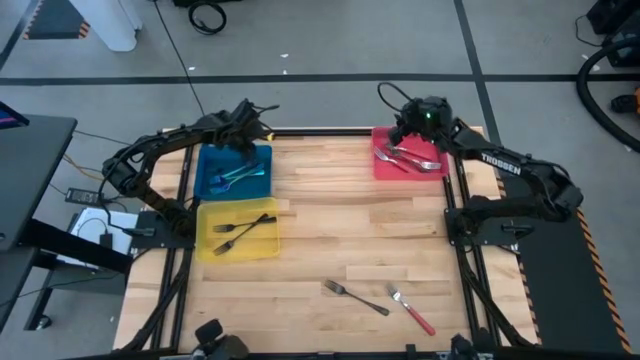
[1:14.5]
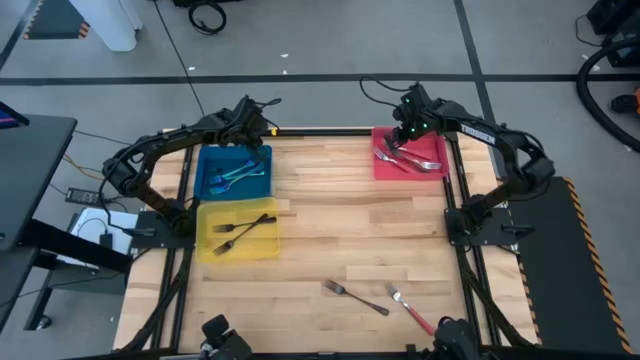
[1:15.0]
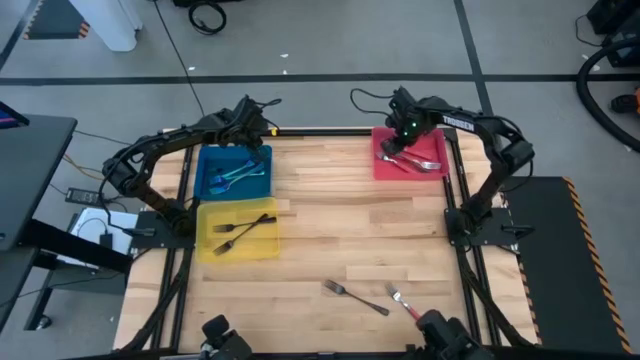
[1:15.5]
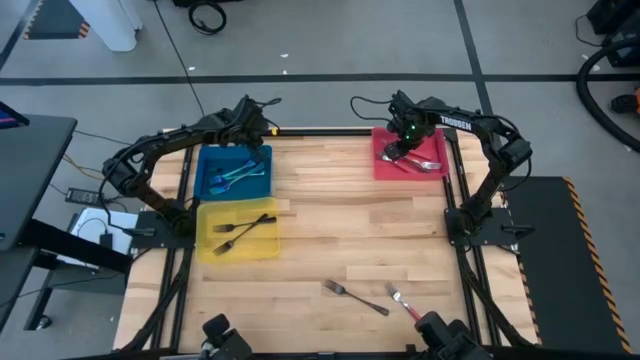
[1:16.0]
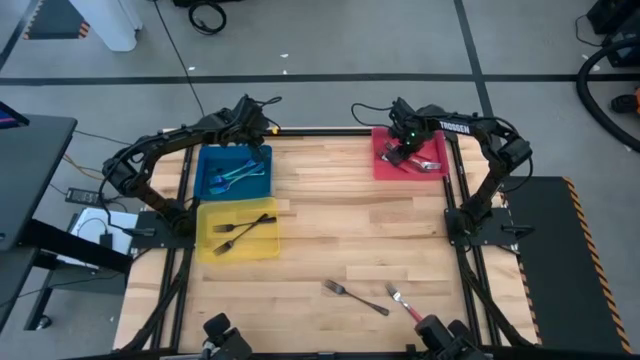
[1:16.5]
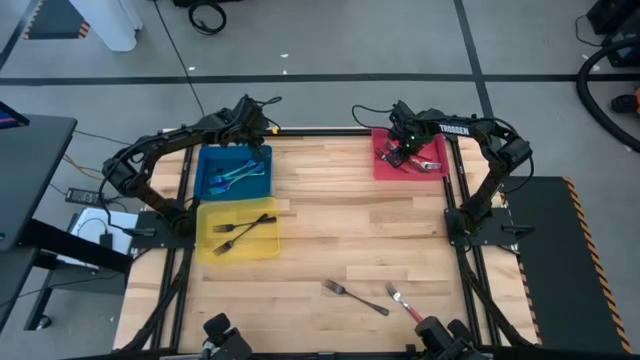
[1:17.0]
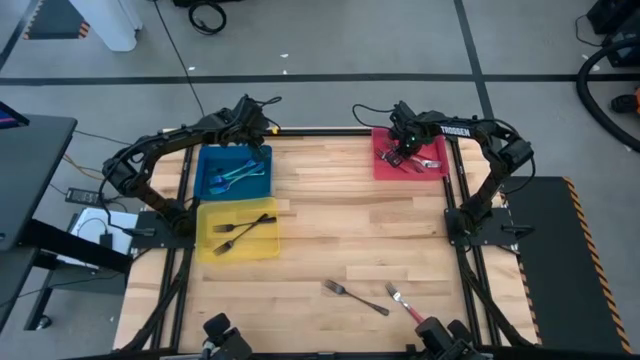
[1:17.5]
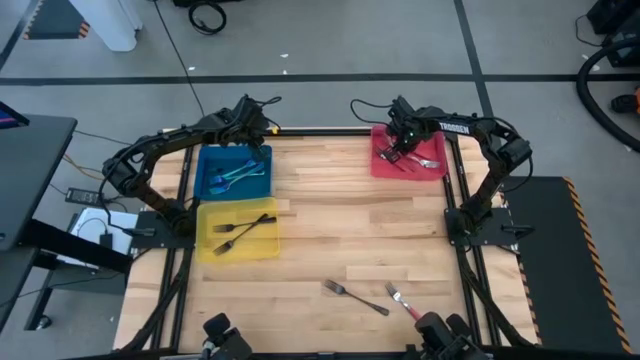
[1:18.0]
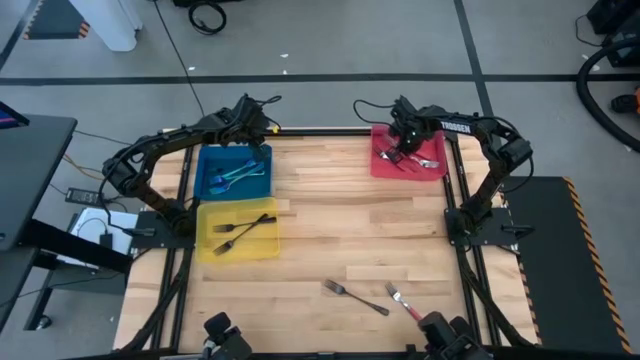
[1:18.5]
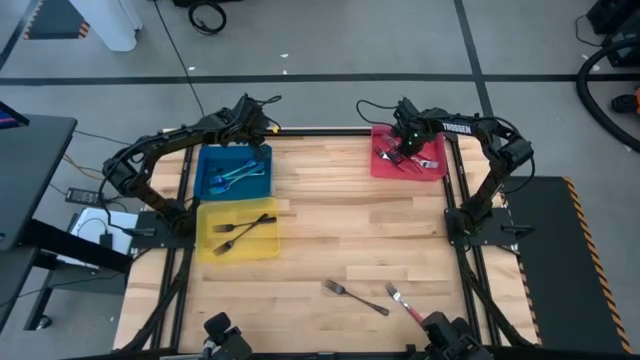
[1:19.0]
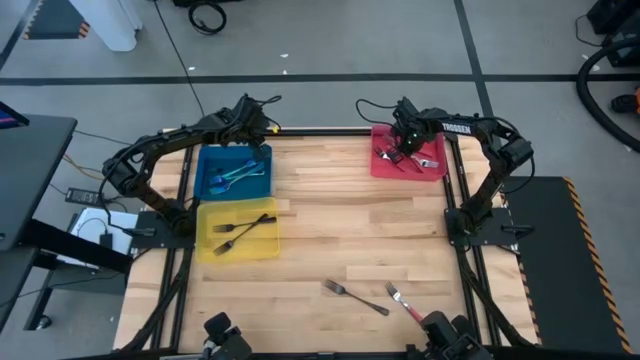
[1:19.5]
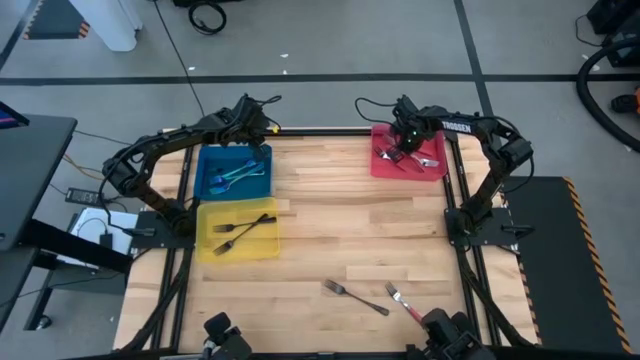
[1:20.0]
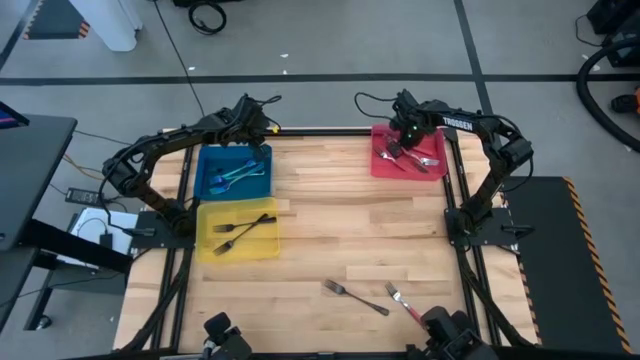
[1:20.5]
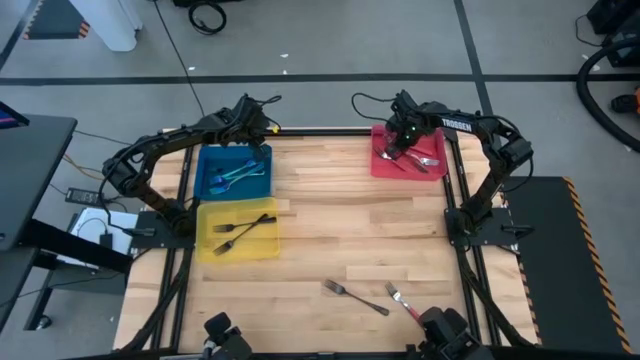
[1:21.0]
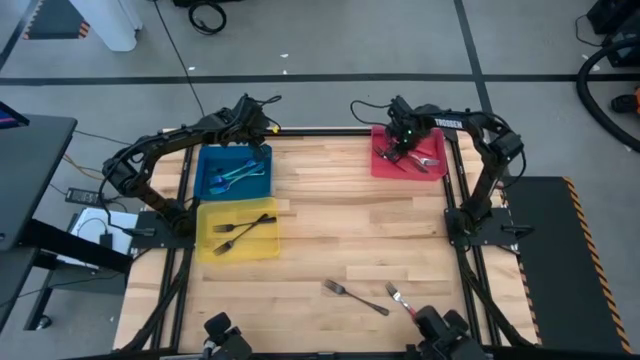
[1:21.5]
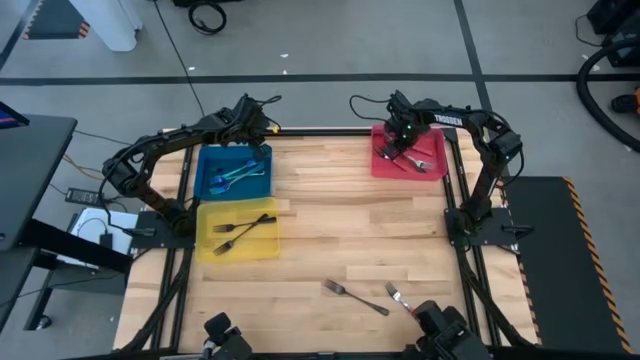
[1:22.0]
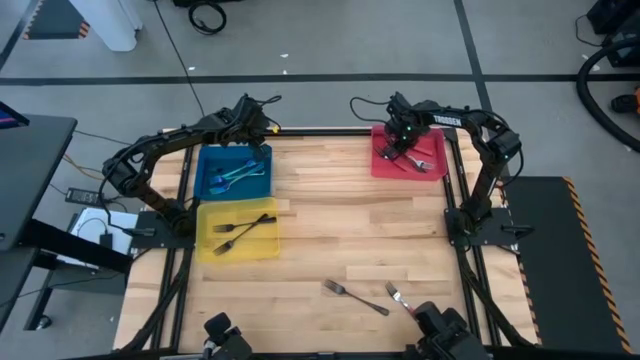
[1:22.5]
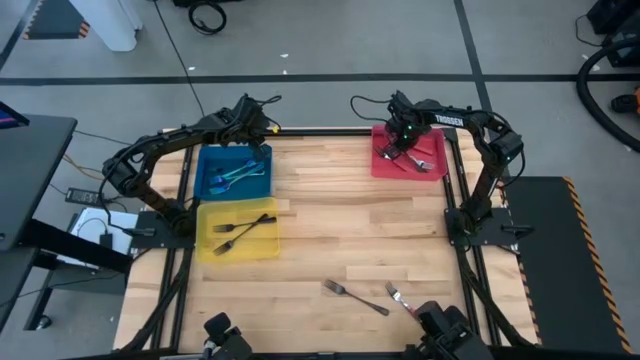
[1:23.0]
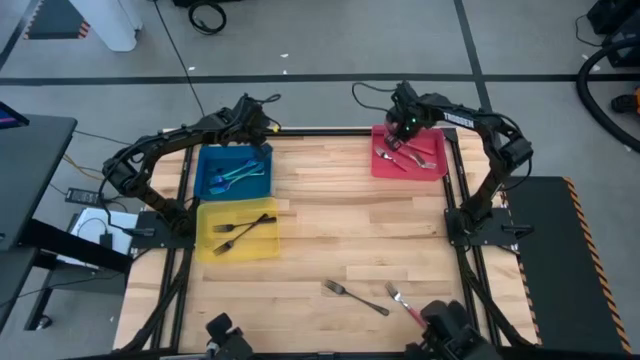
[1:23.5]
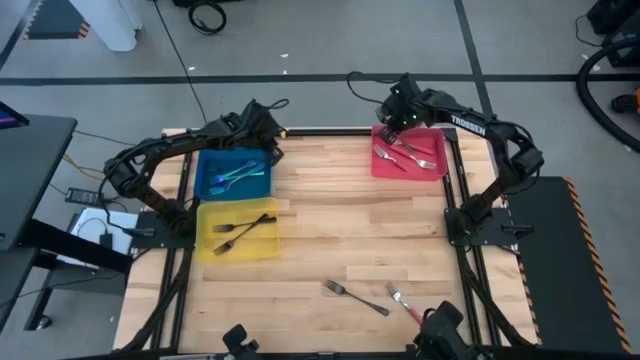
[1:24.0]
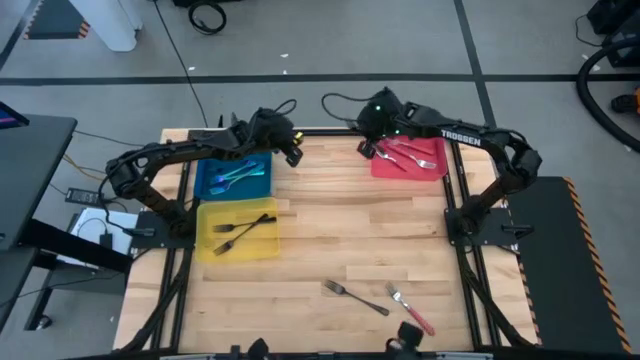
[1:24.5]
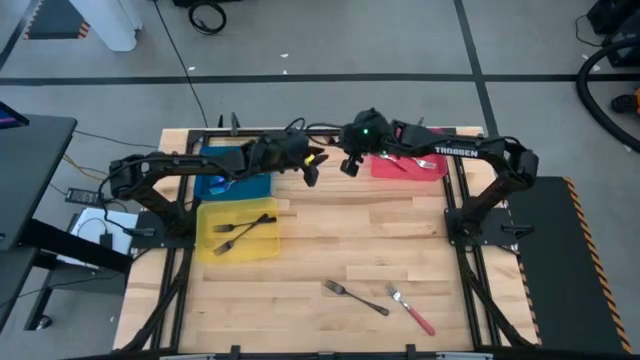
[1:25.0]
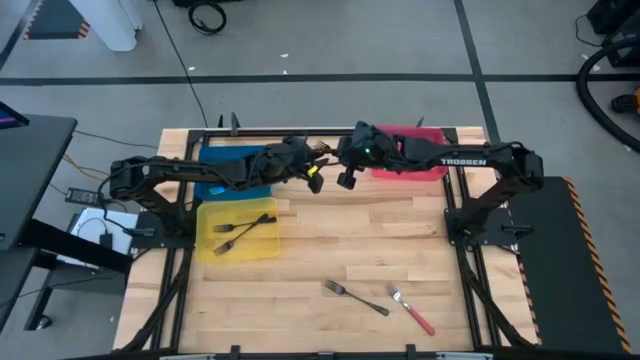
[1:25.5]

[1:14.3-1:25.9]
Task: Sort silverware by color (type)
Put the black fork into the yellow bin

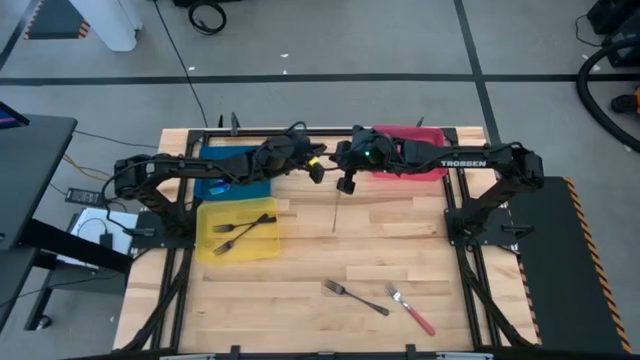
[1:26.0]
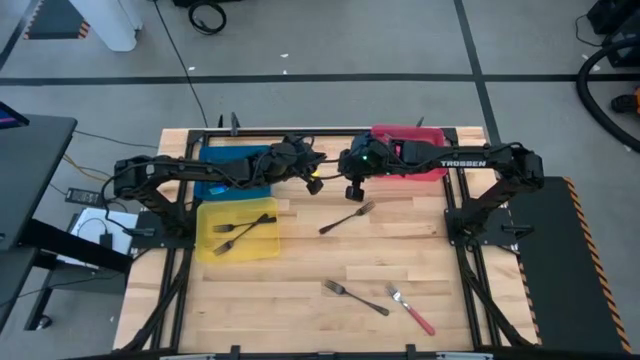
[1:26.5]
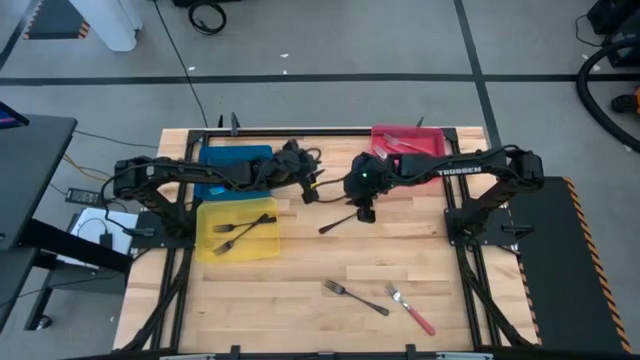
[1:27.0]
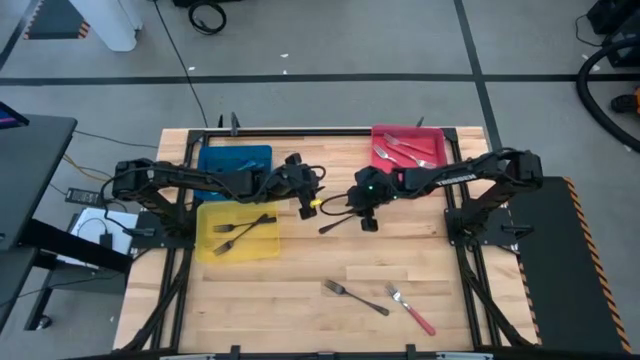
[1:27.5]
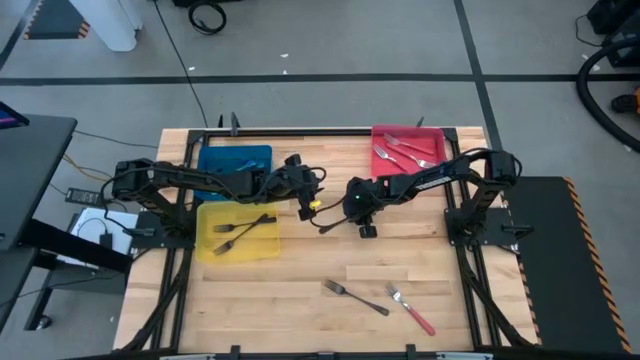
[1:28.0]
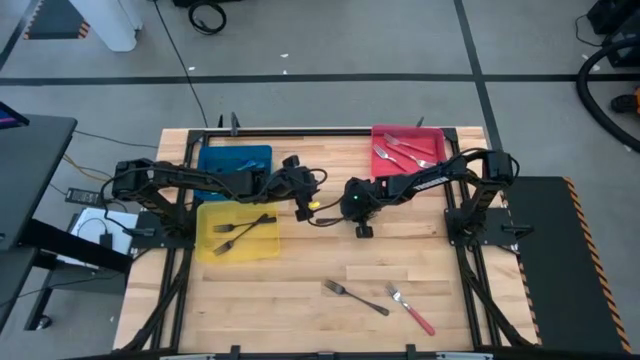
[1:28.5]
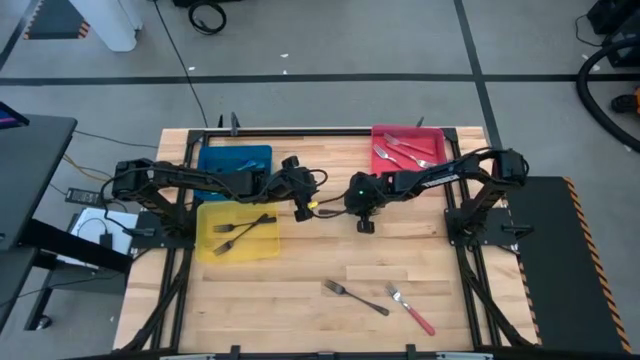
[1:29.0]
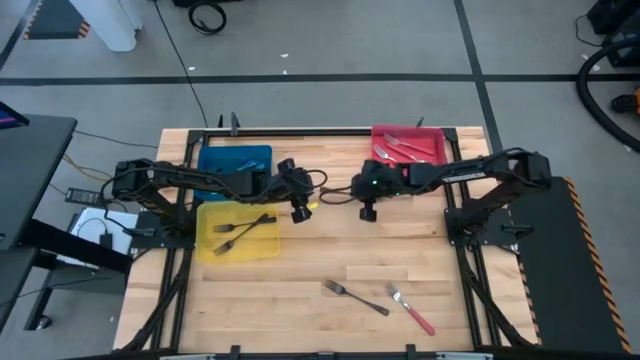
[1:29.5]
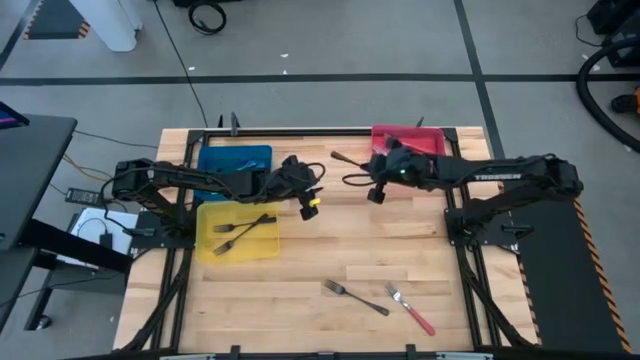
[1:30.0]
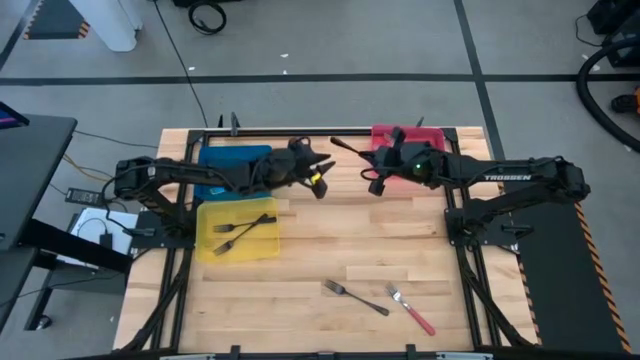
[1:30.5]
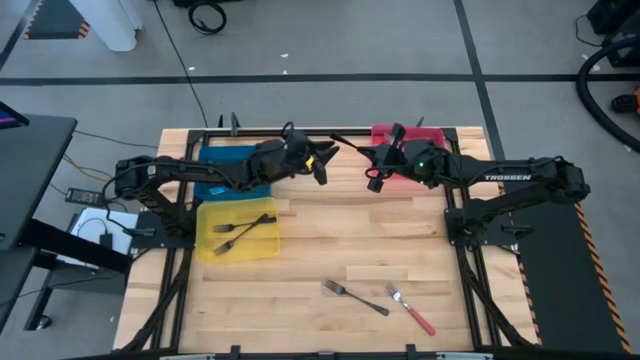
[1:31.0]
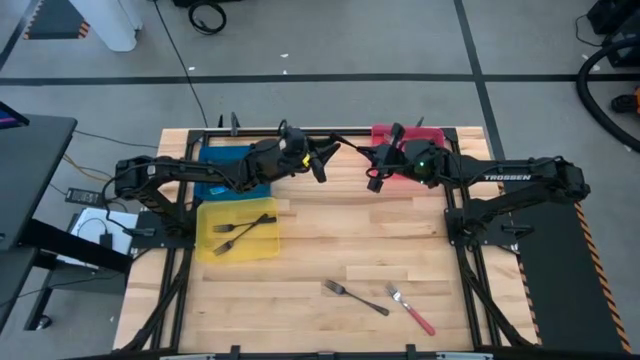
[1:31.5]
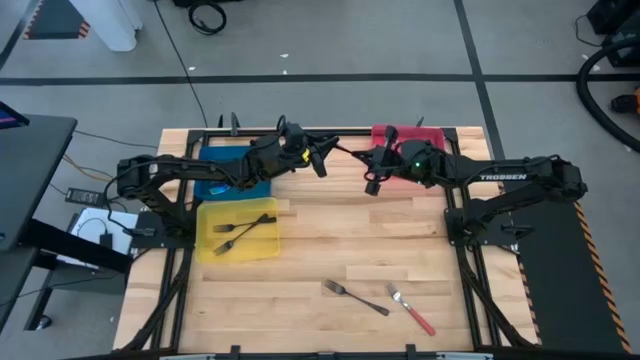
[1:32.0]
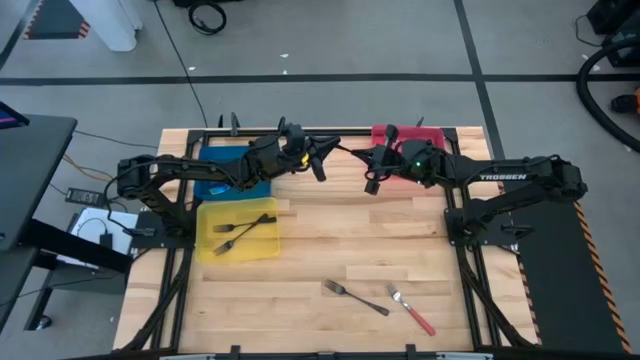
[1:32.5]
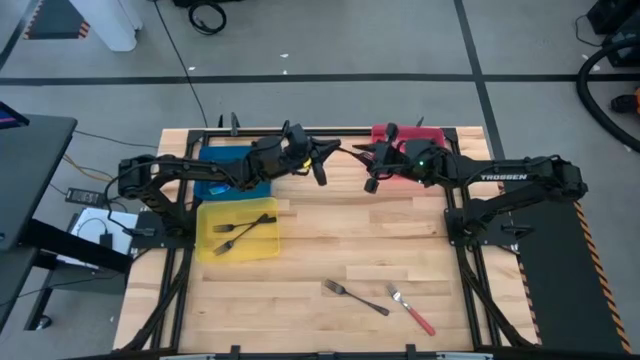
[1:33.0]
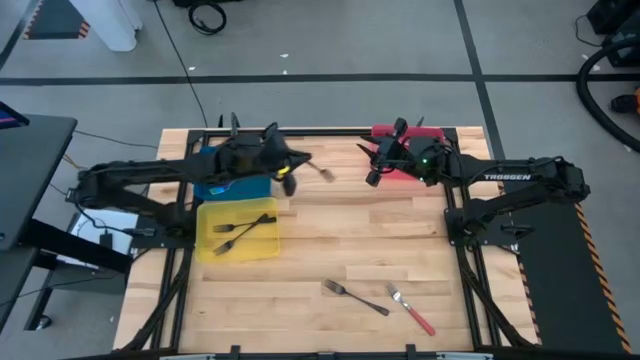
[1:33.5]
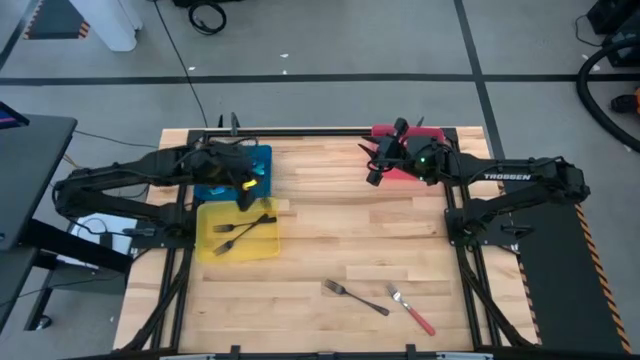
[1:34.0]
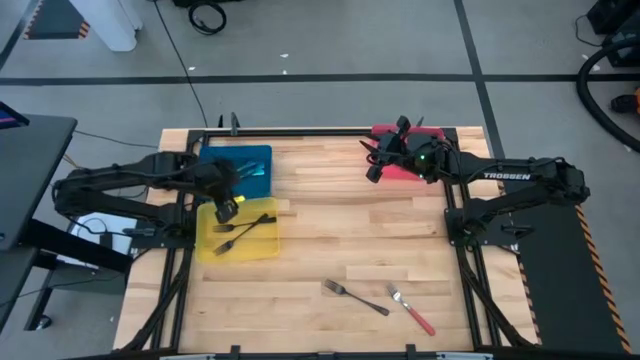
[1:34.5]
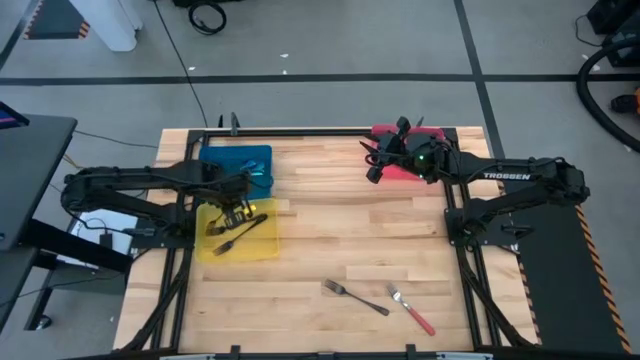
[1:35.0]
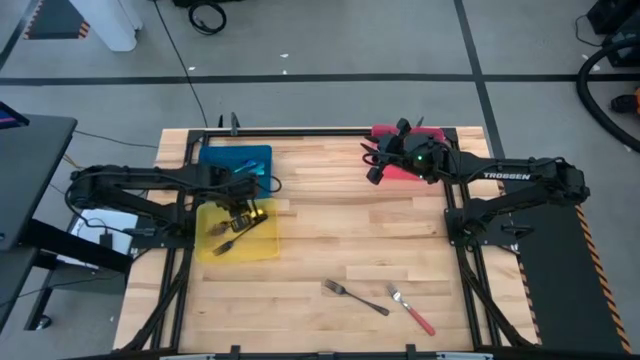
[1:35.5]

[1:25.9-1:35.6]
Put the black fork into the yellow bin
